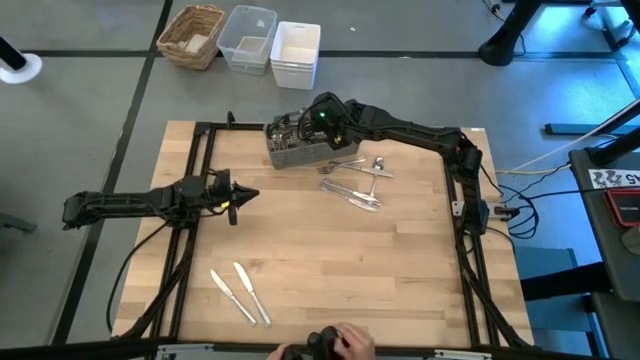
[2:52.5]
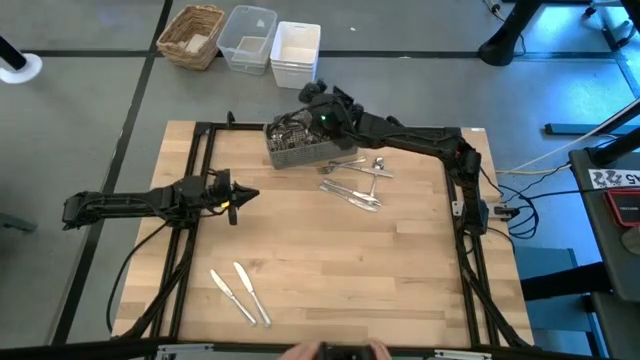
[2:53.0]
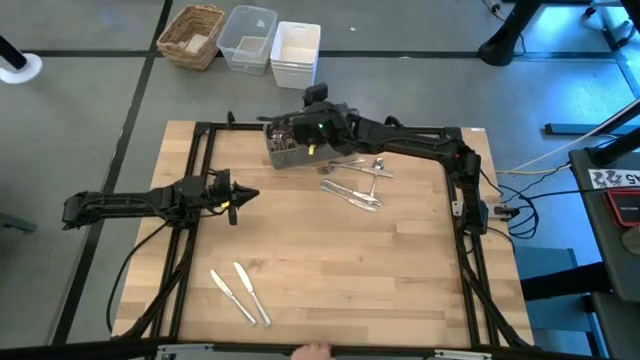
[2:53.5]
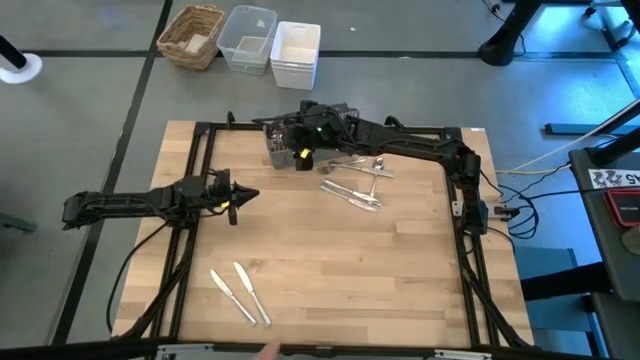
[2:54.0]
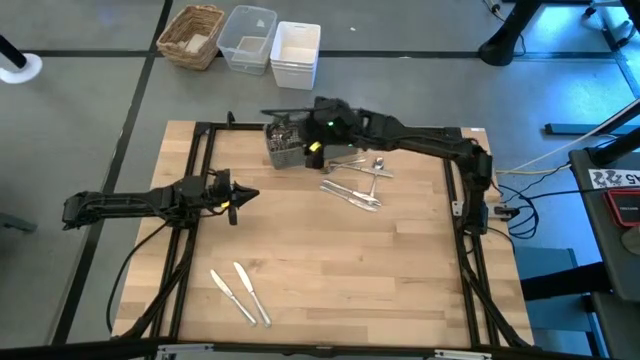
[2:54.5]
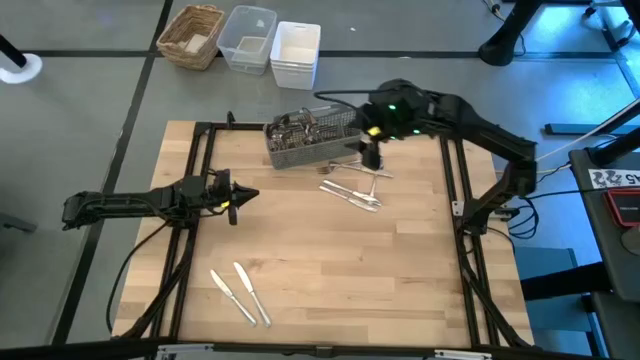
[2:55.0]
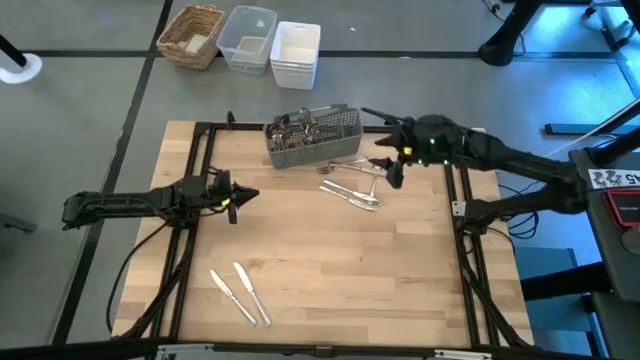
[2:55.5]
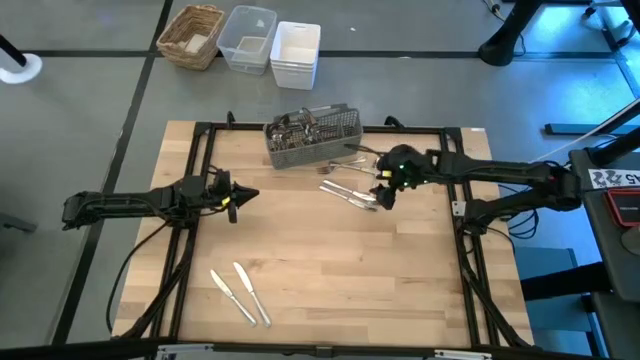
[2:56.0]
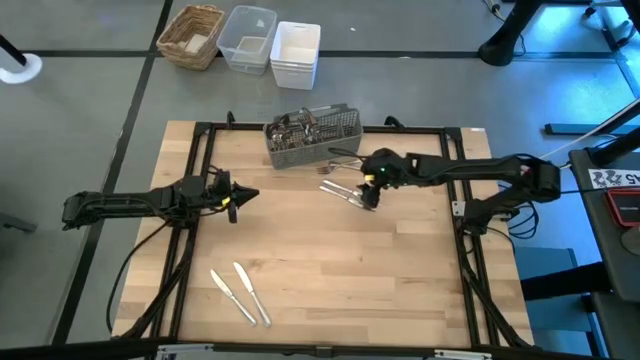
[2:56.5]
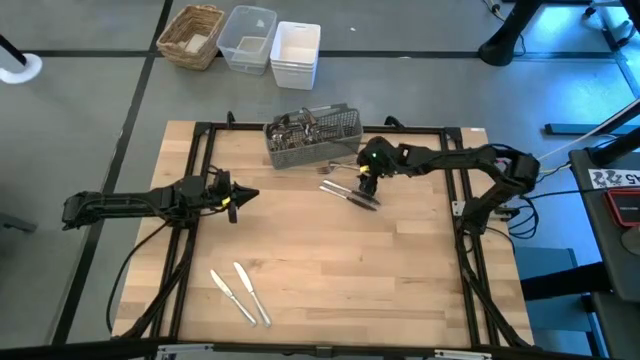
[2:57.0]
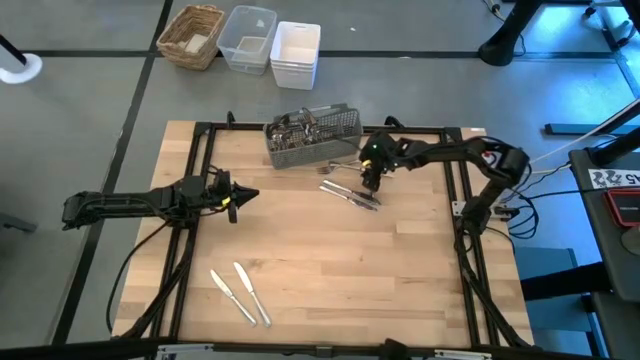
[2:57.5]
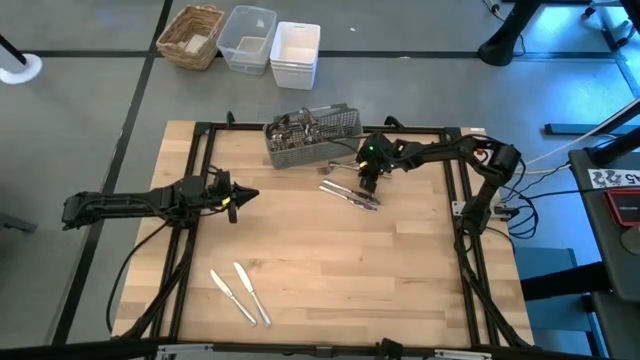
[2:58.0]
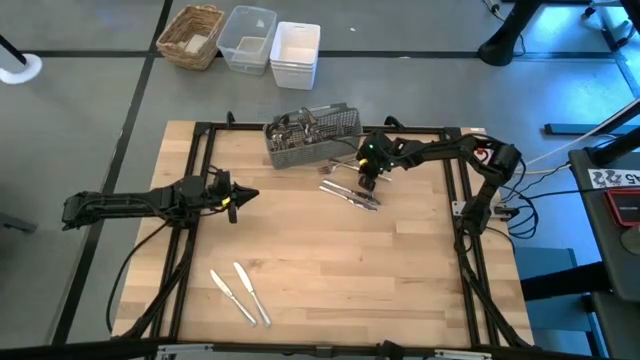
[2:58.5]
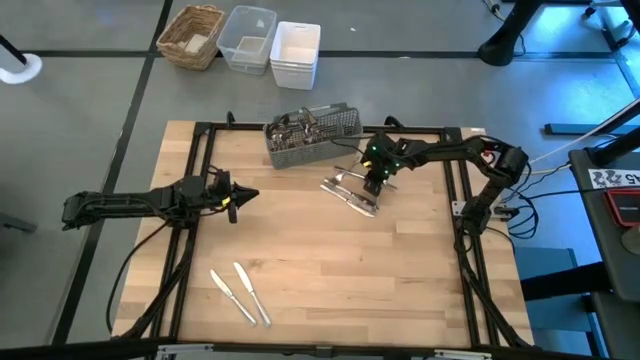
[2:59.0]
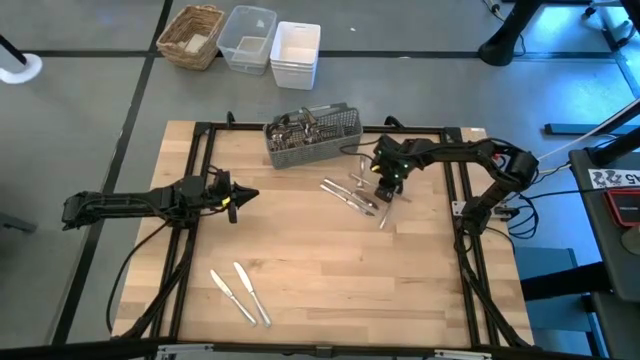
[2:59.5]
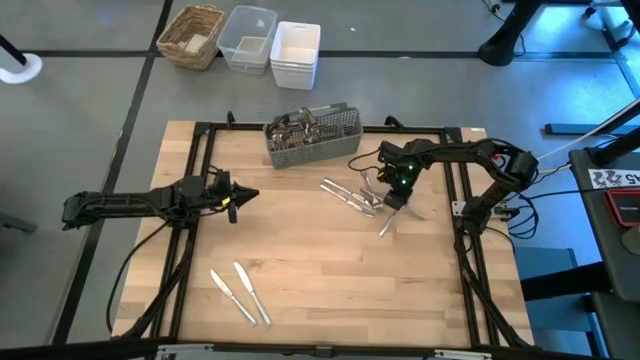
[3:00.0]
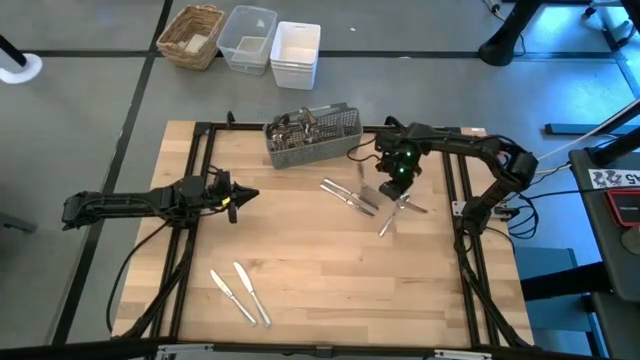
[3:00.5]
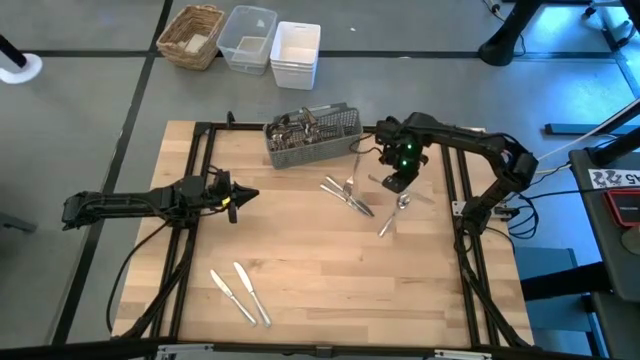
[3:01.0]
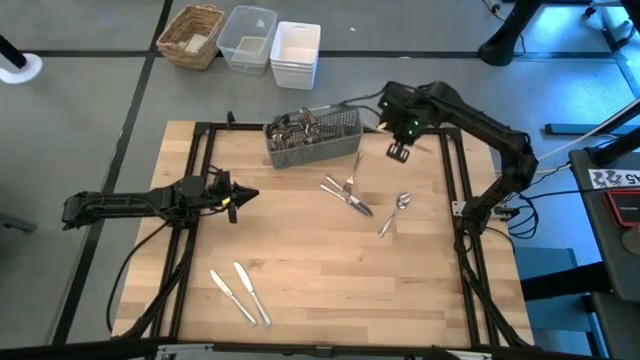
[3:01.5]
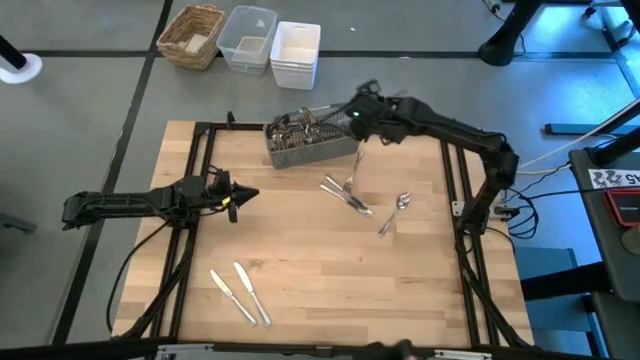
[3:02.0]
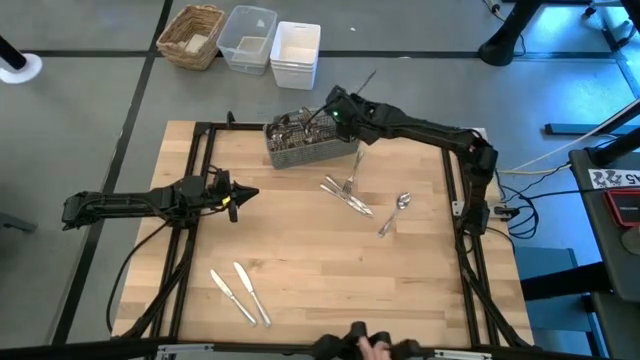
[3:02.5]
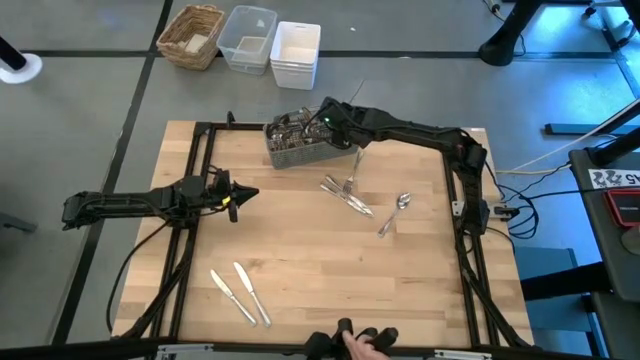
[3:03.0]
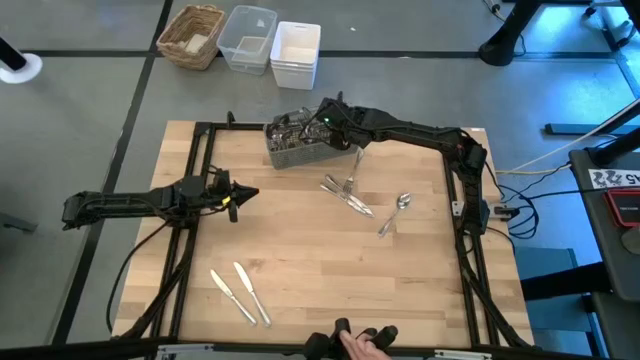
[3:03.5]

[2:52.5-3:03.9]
Task: Sort silverware
Put the silver fork into the silverware rack

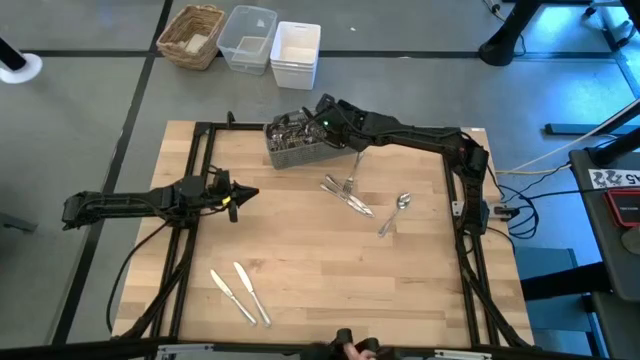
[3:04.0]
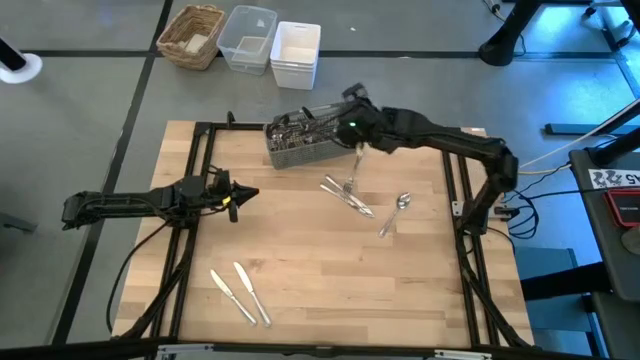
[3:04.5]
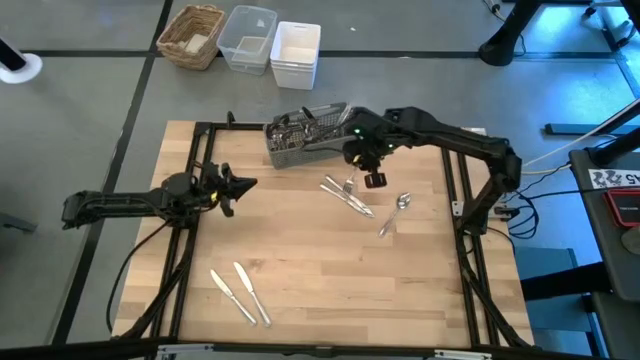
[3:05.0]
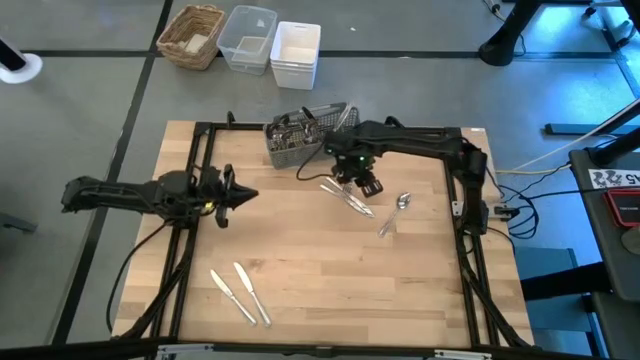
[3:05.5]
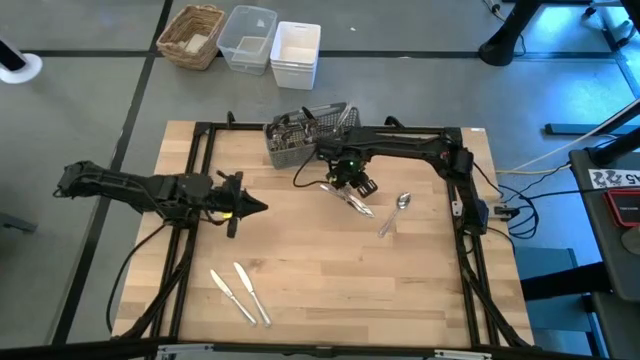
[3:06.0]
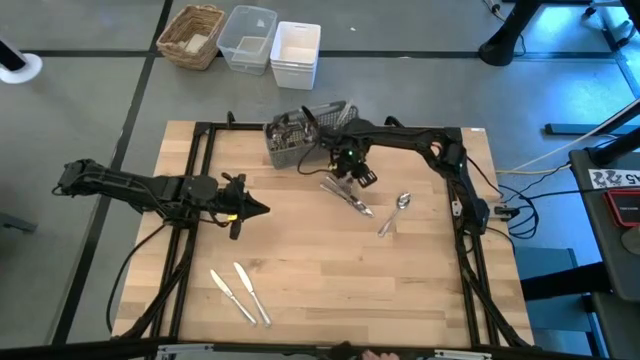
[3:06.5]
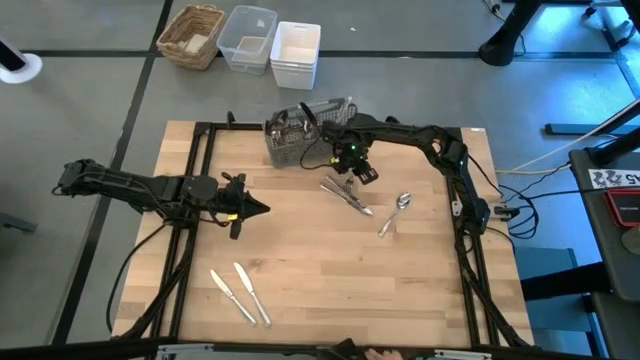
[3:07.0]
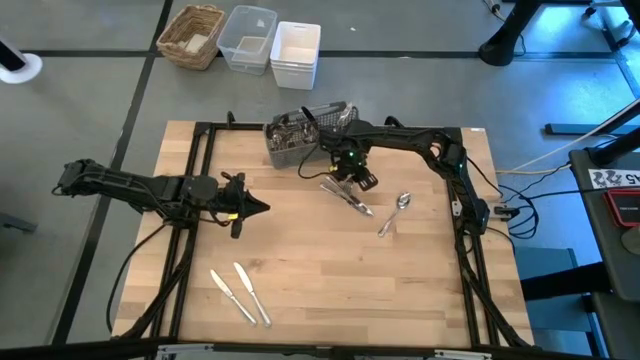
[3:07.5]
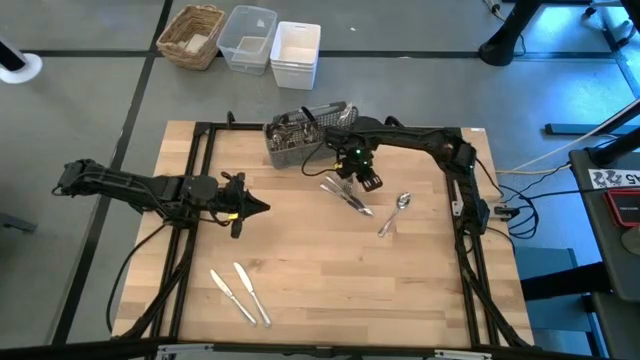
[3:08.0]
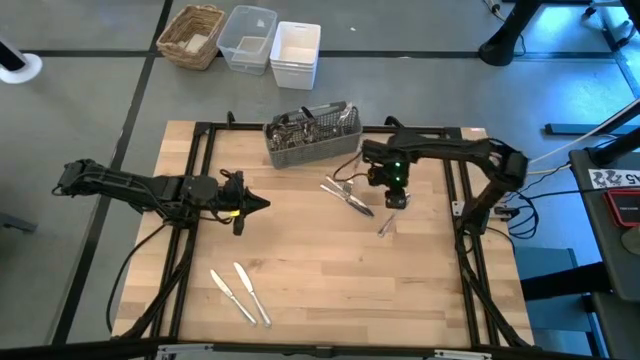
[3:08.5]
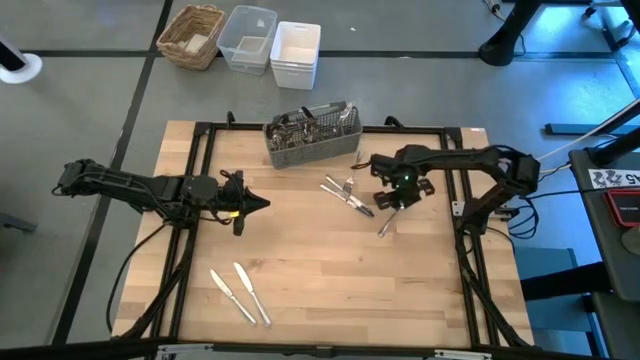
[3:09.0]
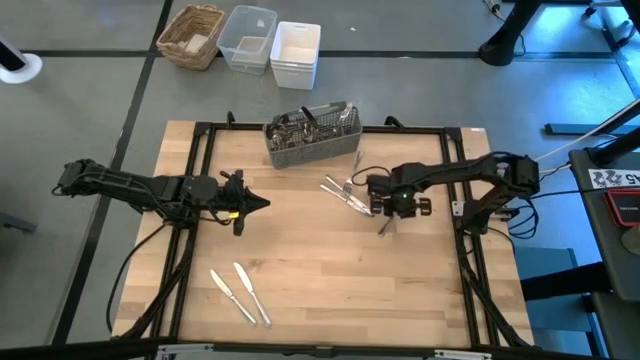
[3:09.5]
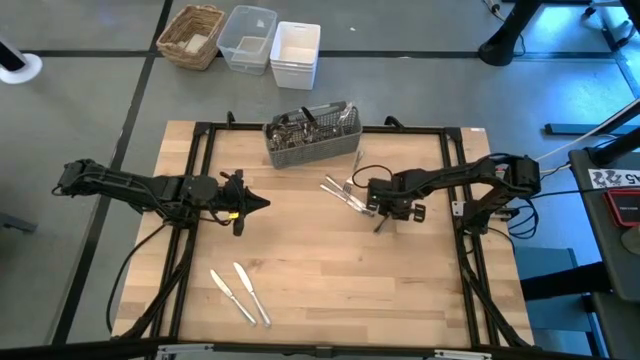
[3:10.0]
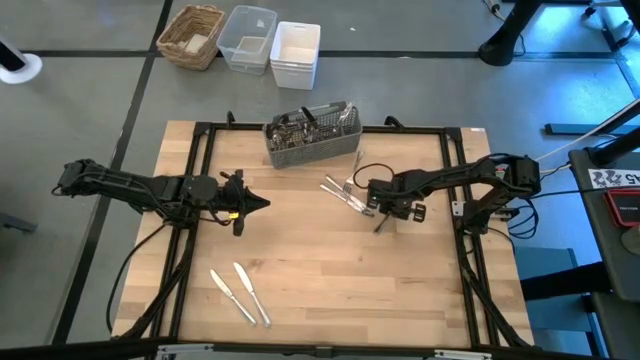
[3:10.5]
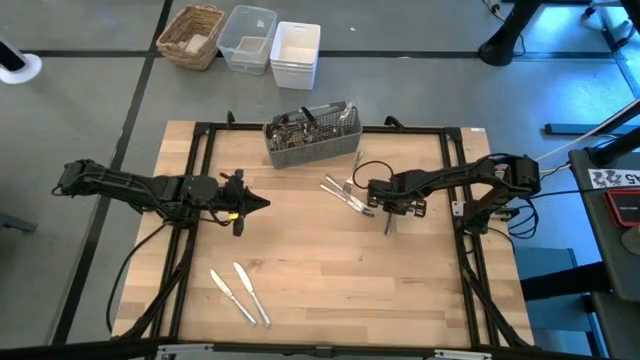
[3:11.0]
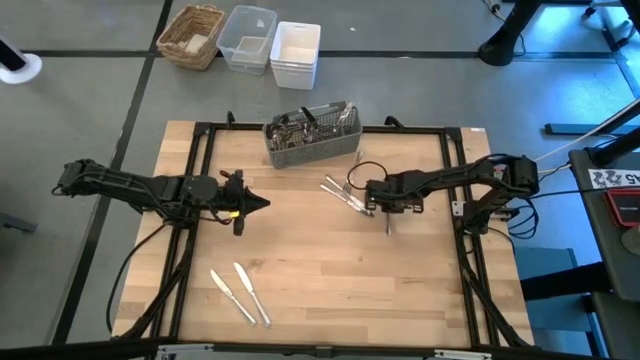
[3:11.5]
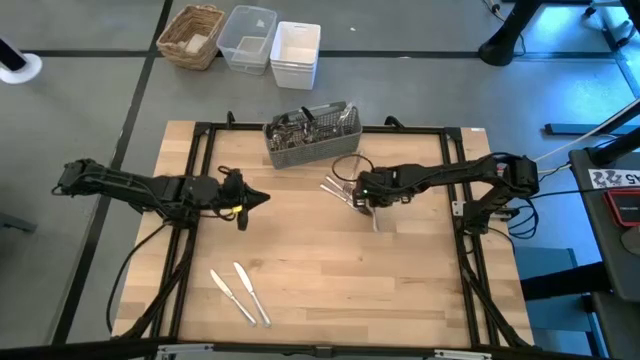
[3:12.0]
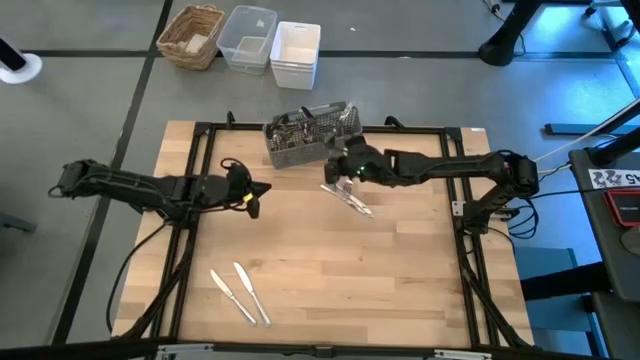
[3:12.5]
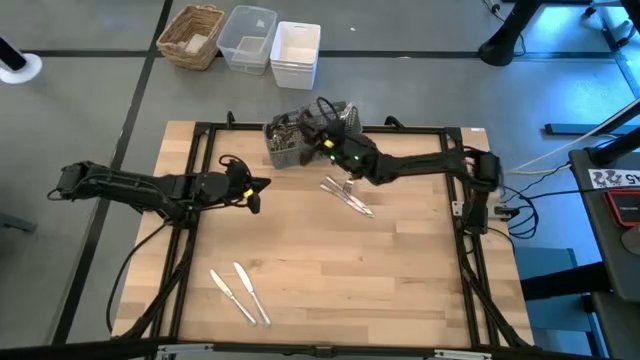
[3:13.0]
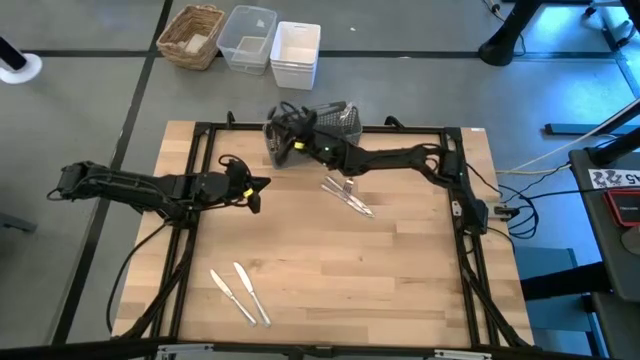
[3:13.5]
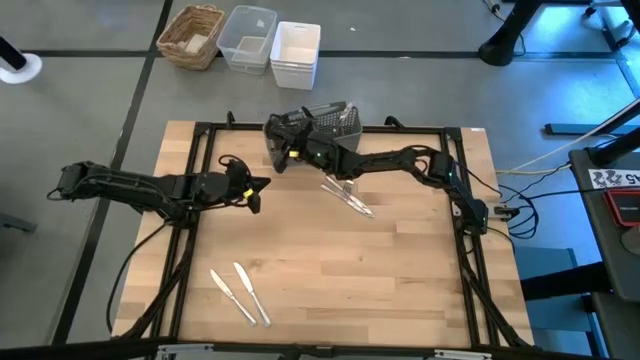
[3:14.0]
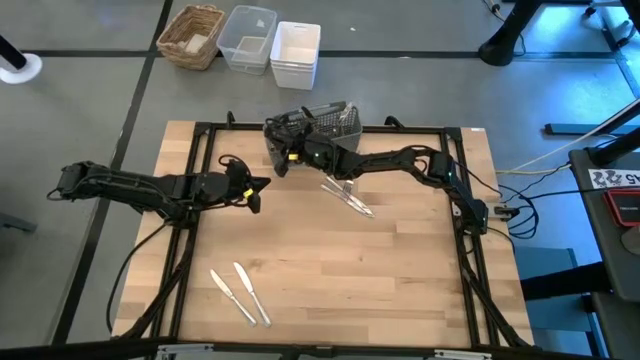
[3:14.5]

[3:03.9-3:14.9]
Put the silver spoon into the silverware rack
